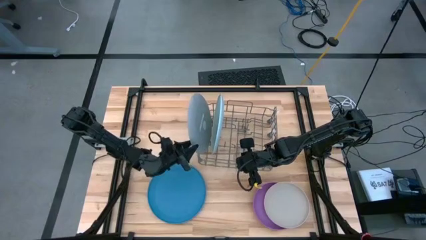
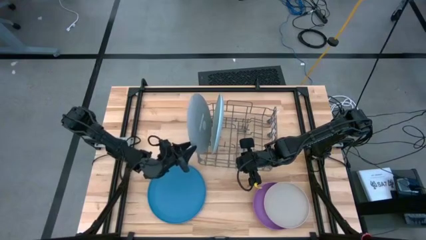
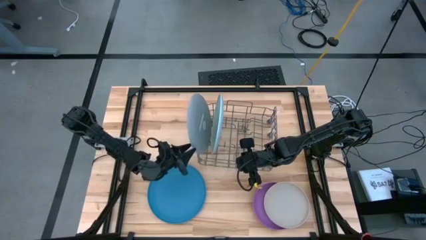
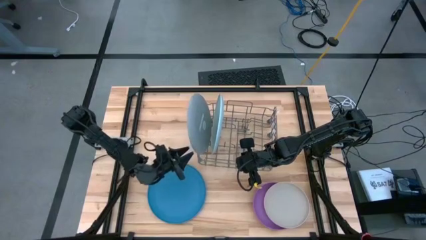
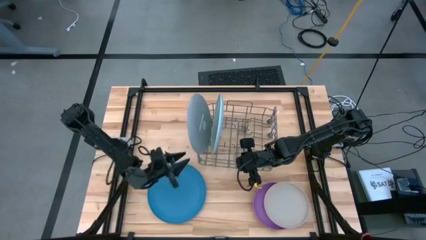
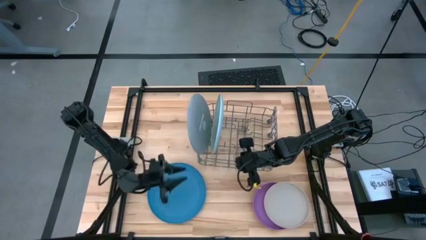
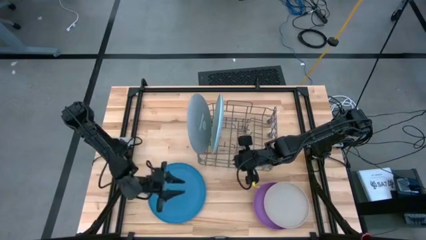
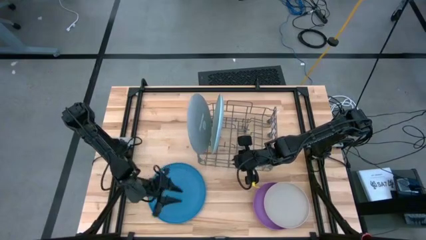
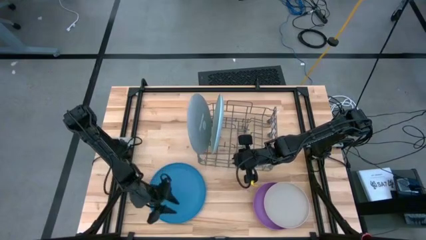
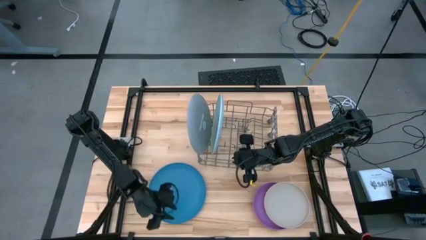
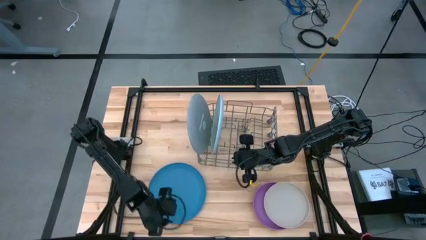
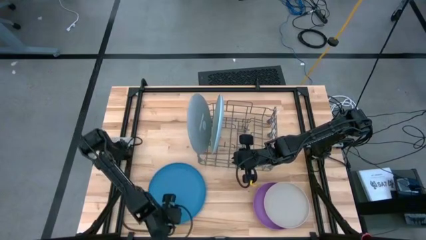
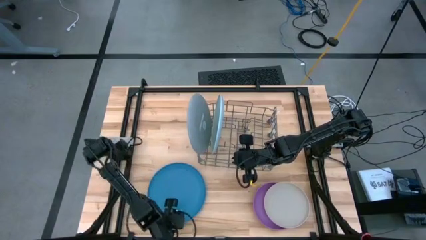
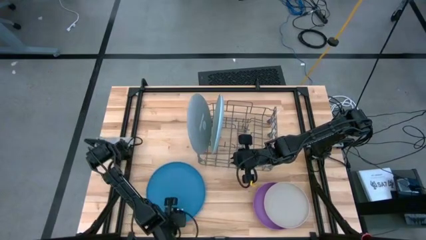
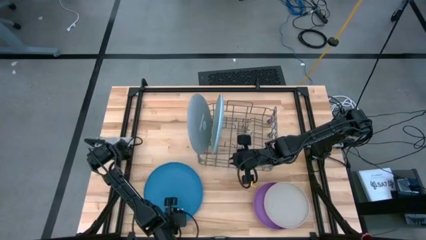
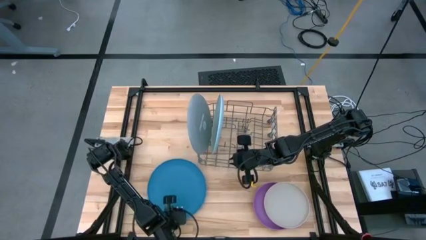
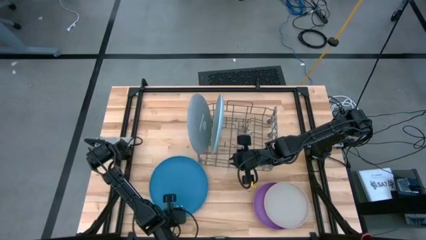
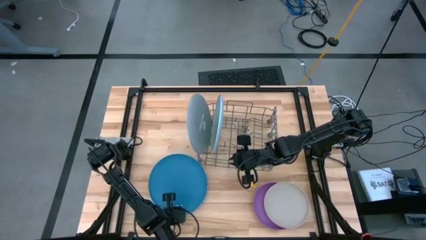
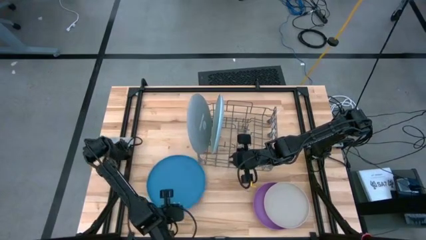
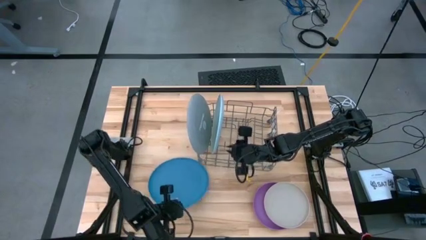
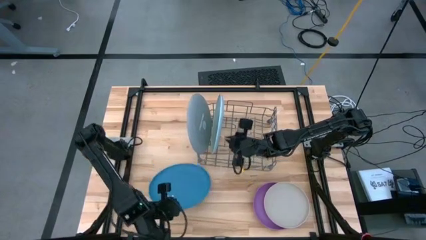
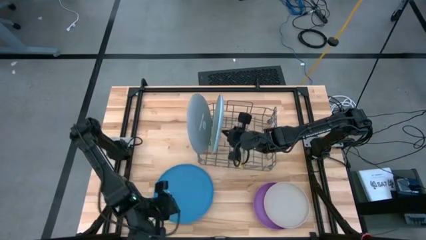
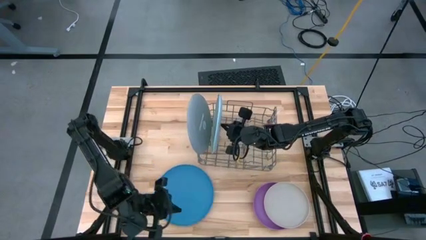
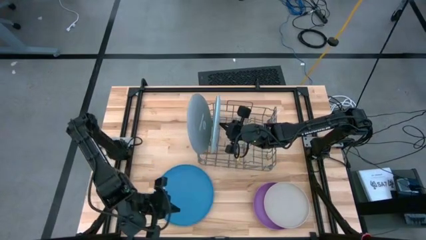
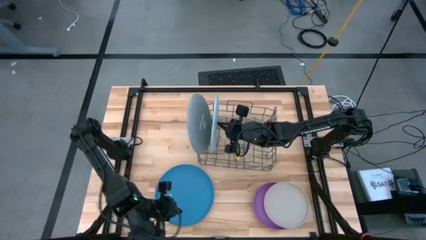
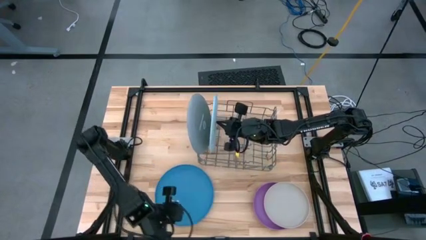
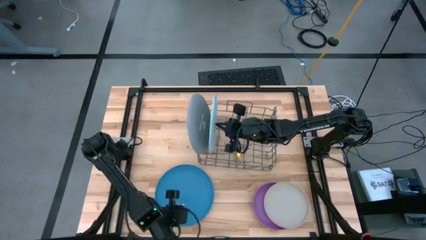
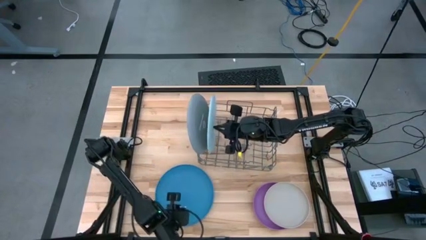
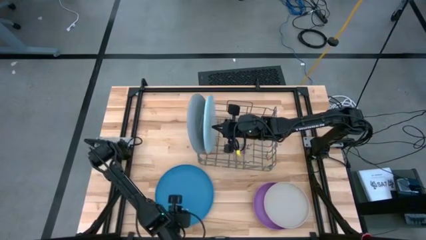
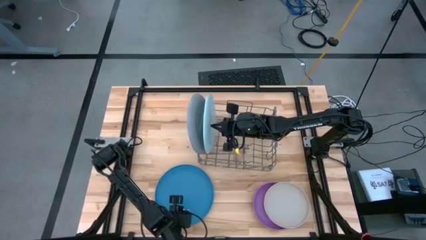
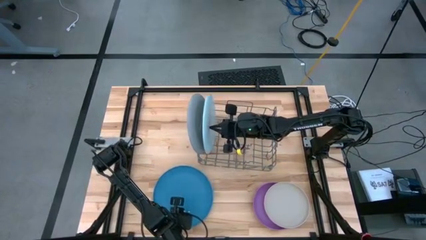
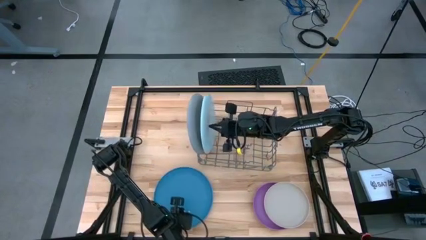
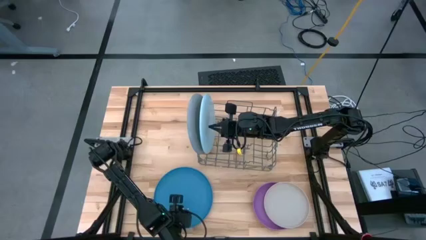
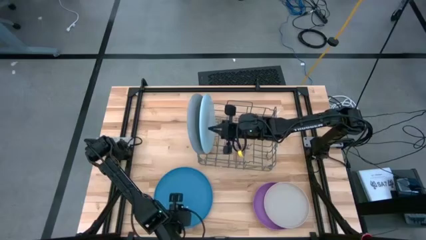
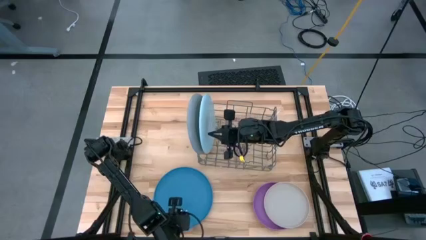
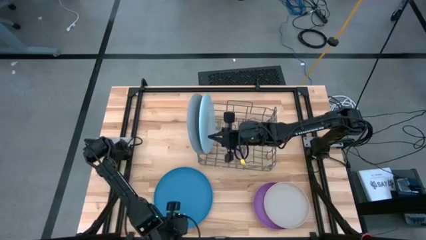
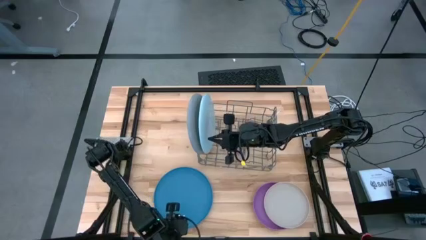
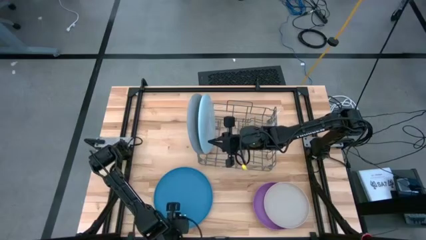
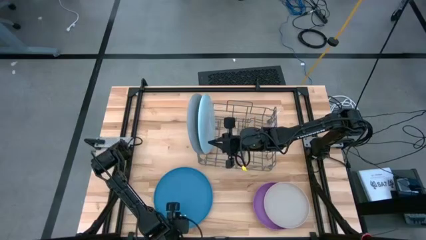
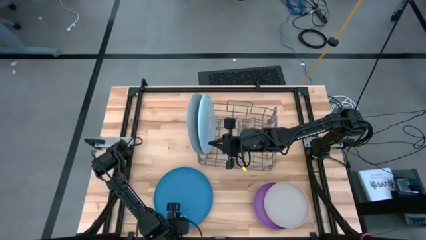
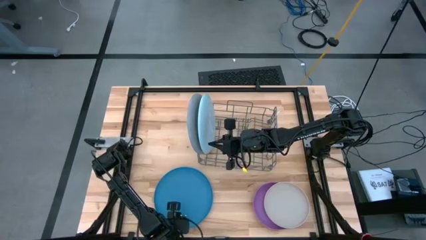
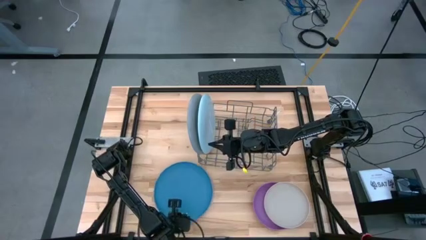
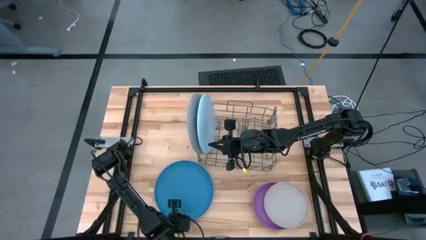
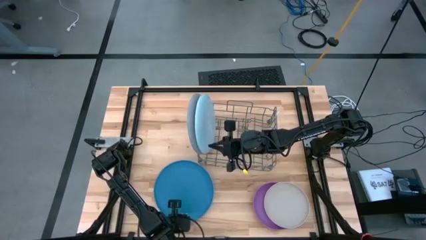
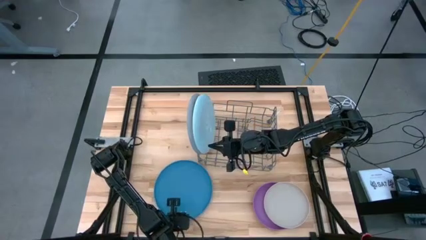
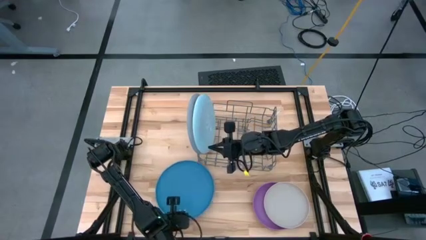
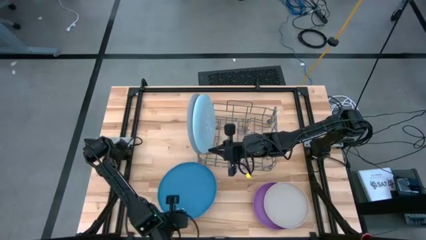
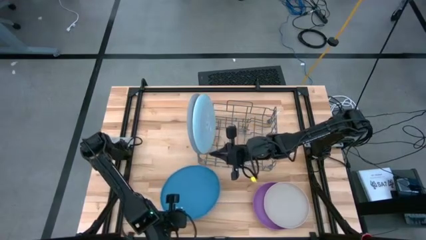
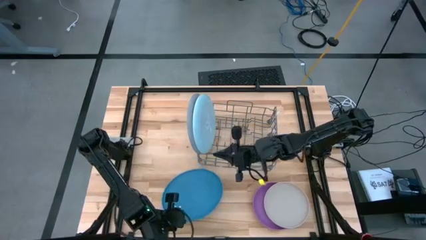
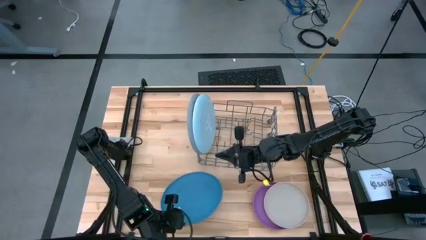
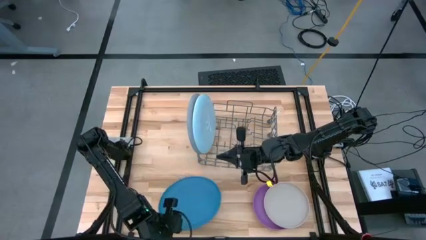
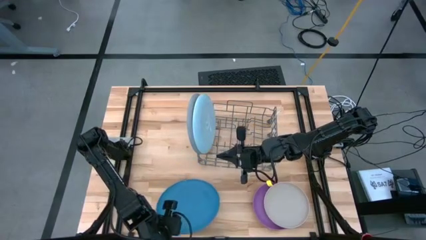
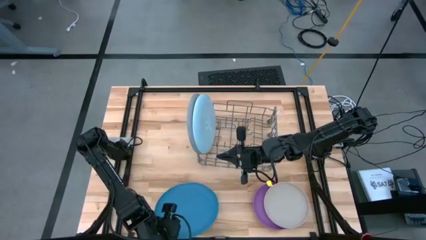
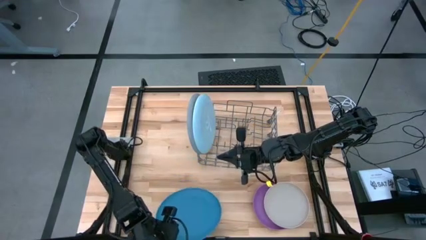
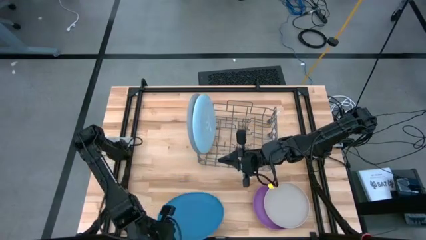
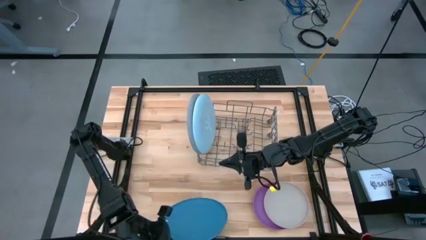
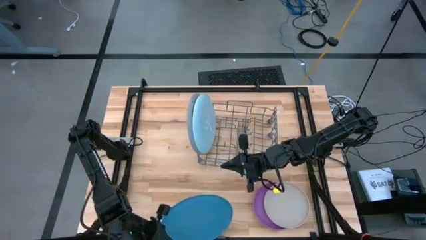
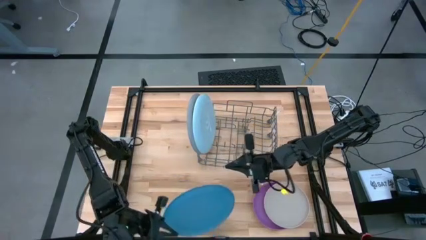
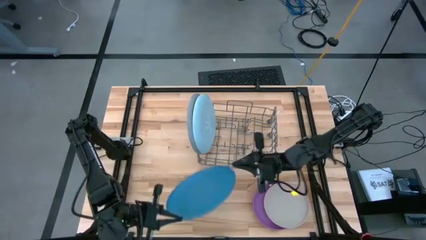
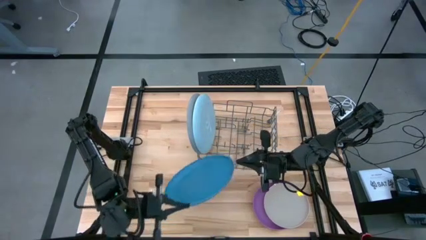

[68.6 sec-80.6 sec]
Task: Sort dishes
Put the dark blue plate into the dish rack
